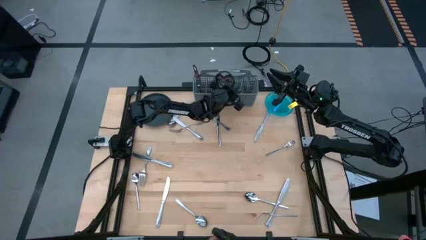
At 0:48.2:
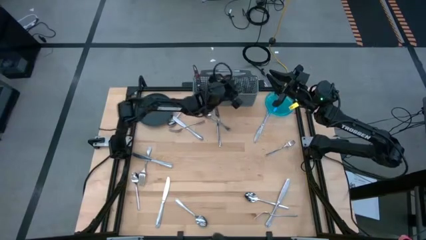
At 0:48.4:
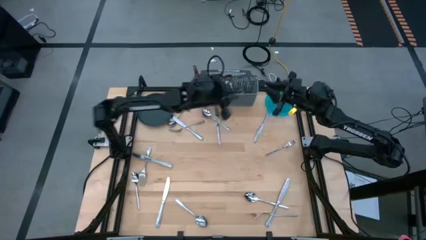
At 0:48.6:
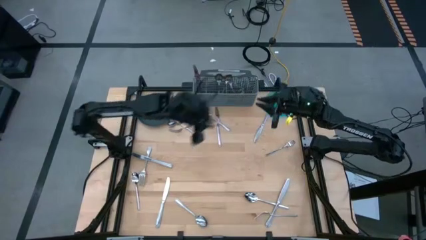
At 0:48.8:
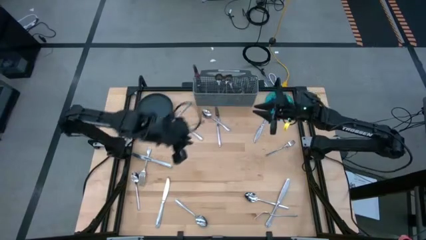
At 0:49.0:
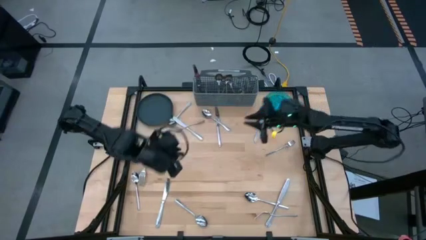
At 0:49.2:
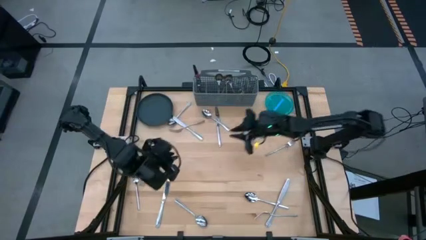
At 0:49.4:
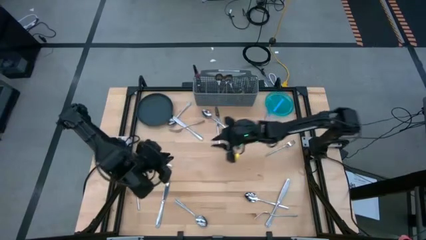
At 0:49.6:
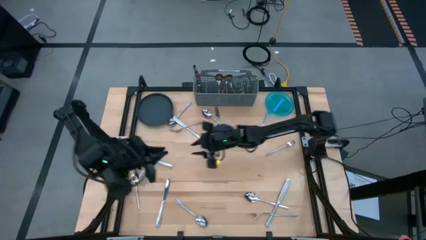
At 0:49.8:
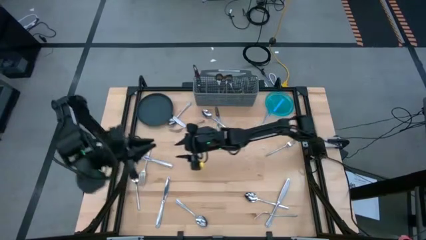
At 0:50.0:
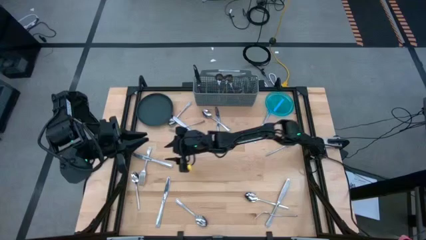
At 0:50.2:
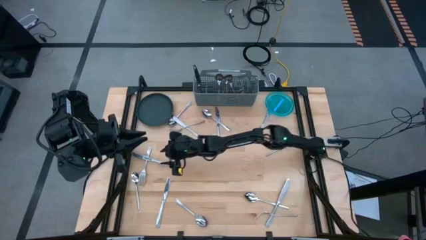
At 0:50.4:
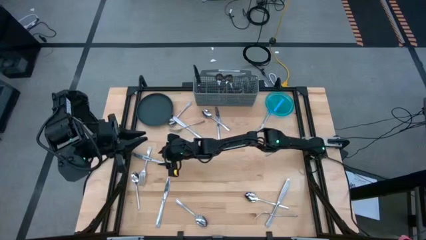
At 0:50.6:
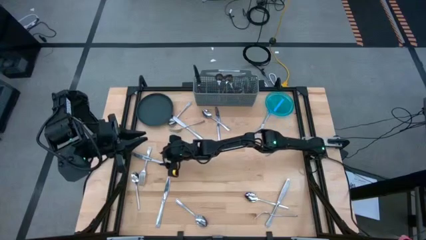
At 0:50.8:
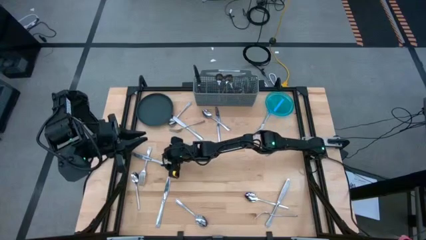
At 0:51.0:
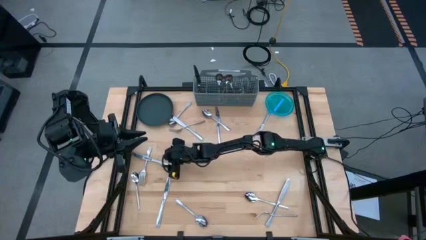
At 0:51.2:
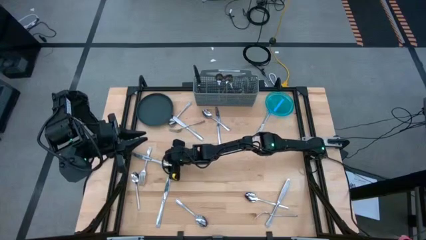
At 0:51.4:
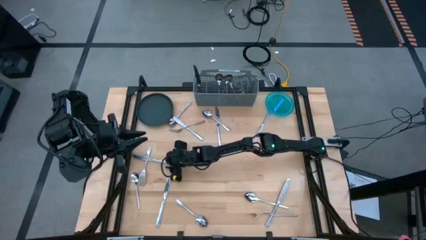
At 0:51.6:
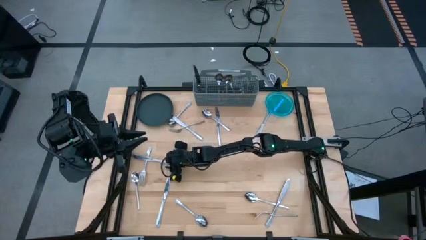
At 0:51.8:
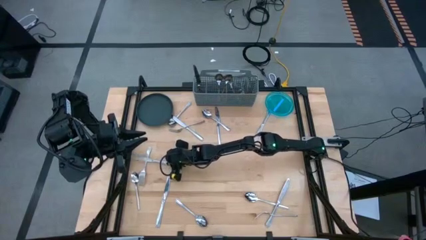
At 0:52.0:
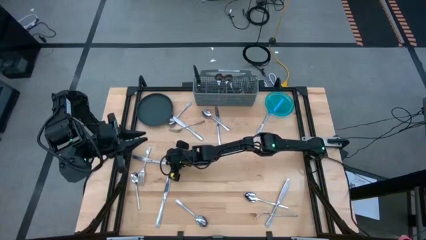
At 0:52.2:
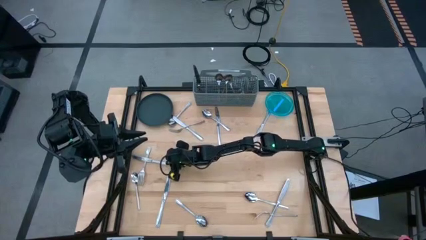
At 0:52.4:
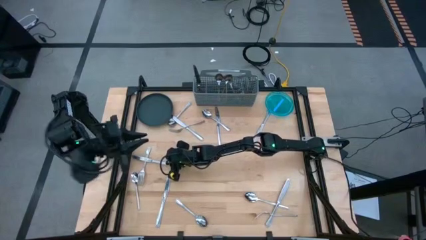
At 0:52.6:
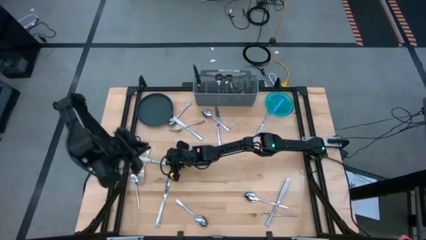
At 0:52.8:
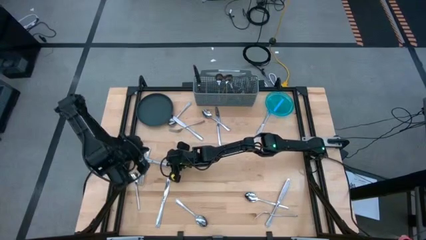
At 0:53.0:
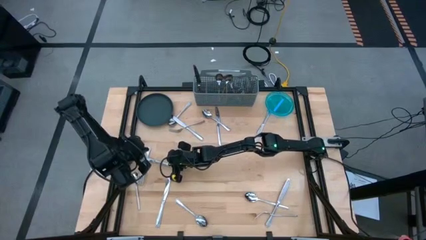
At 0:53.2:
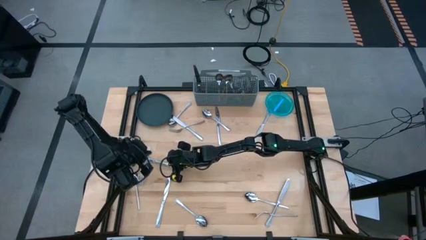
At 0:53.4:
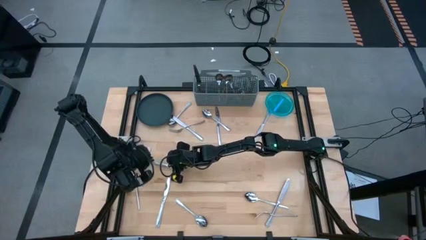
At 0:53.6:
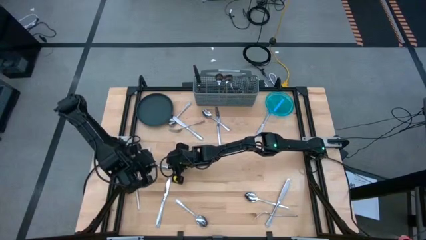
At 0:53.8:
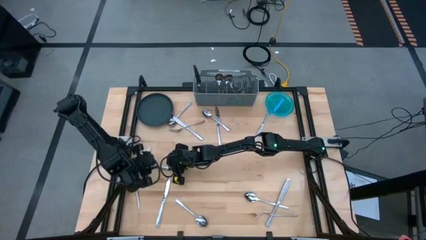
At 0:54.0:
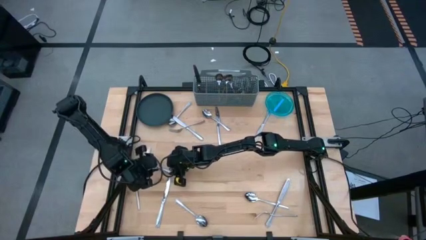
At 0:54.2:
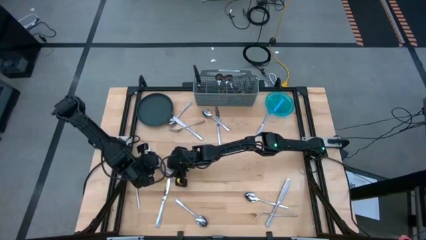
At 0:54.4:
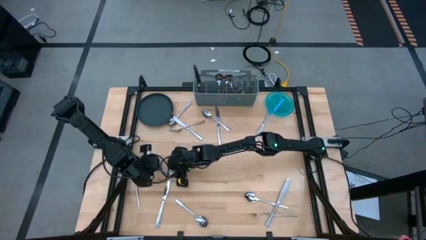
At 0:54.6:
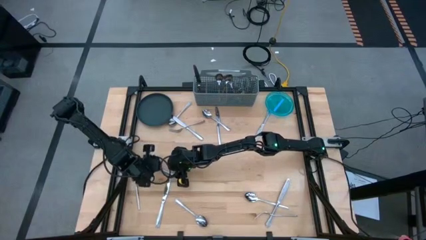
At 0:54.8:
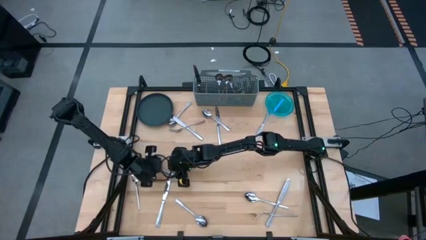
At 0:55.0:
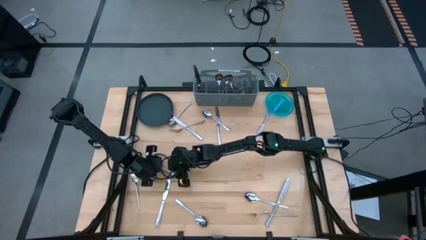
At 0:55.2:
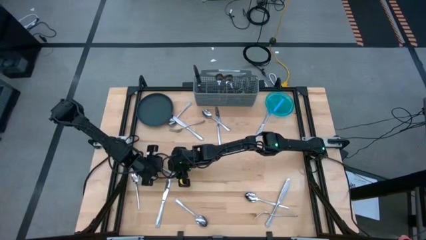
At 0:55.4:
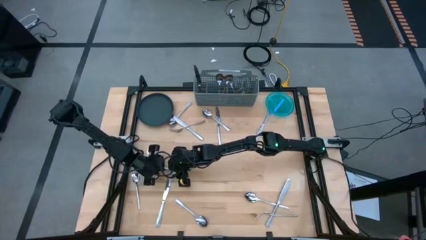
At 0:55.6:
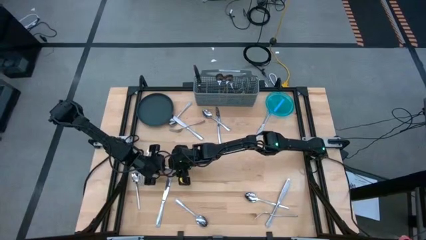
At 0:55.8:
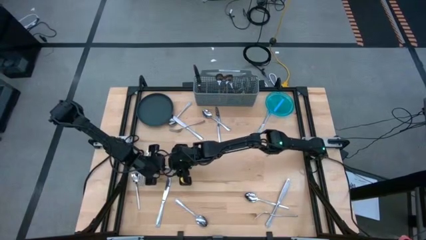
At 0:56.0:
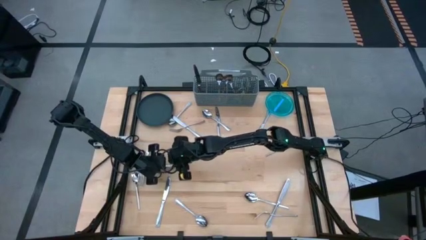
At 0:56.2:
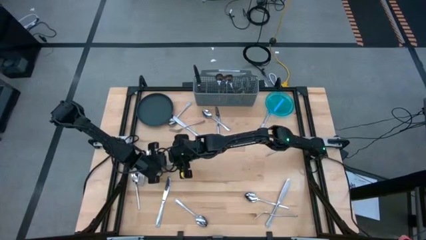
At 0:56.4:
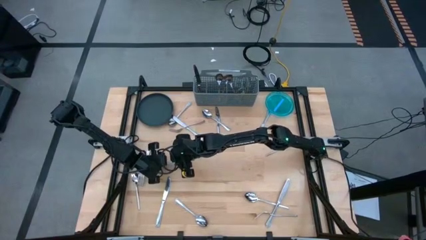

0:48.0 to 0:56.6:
Task: Sort silverware
Put the knife into the silverware basket

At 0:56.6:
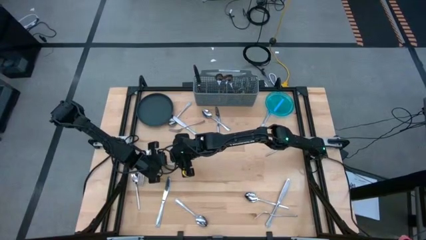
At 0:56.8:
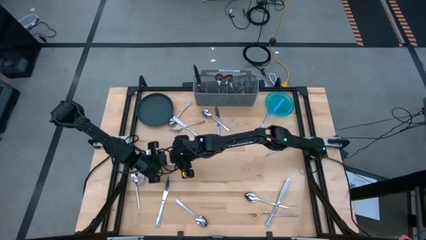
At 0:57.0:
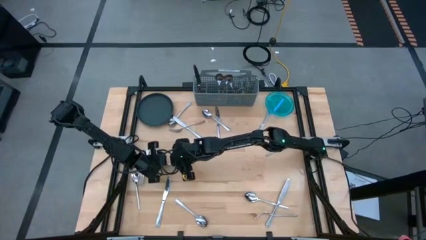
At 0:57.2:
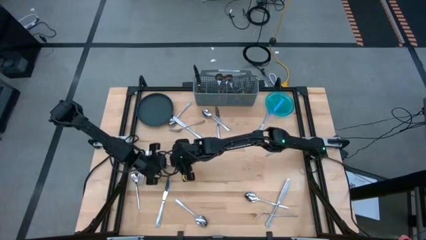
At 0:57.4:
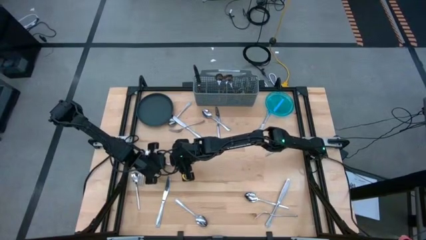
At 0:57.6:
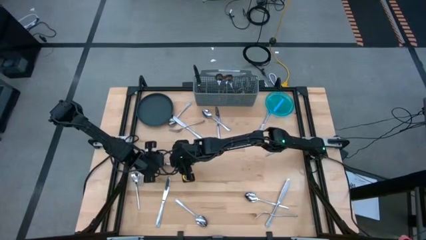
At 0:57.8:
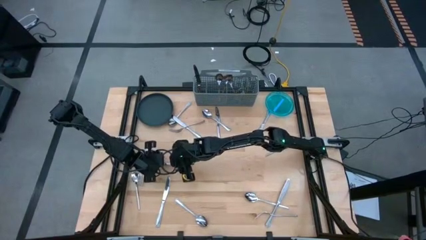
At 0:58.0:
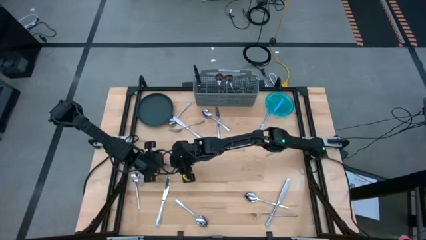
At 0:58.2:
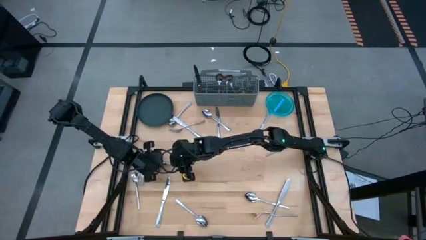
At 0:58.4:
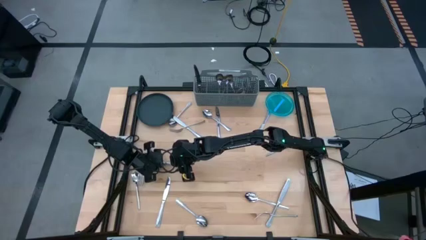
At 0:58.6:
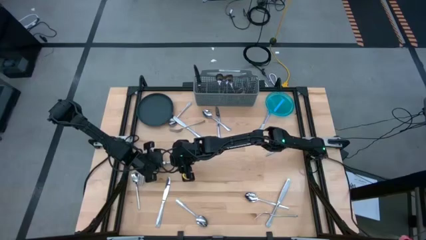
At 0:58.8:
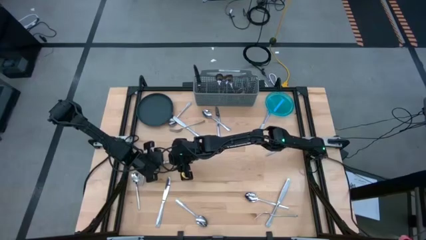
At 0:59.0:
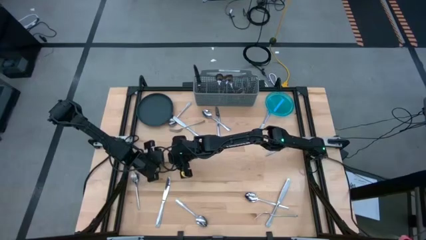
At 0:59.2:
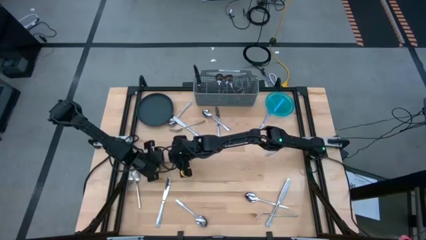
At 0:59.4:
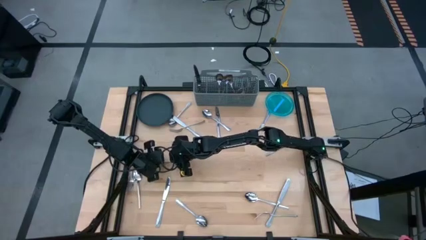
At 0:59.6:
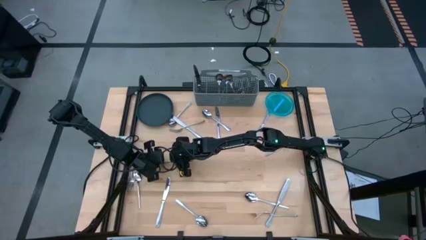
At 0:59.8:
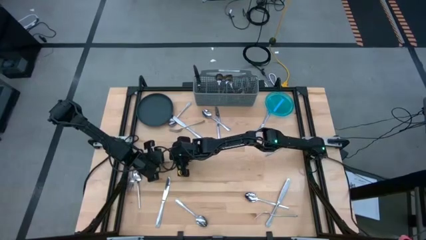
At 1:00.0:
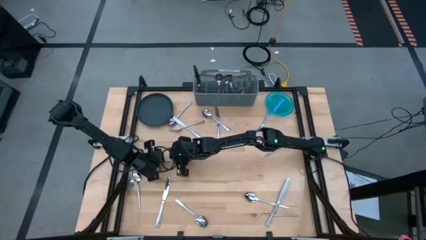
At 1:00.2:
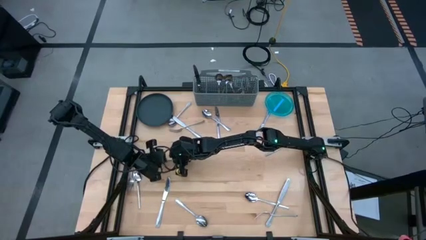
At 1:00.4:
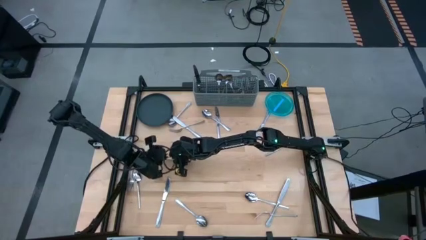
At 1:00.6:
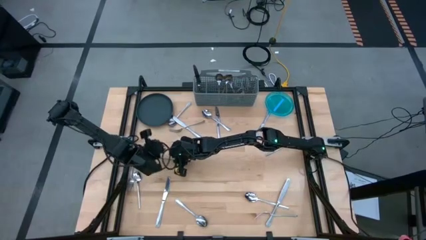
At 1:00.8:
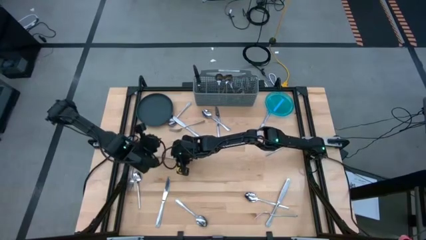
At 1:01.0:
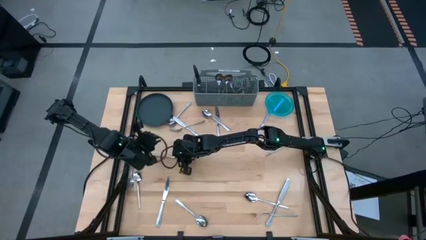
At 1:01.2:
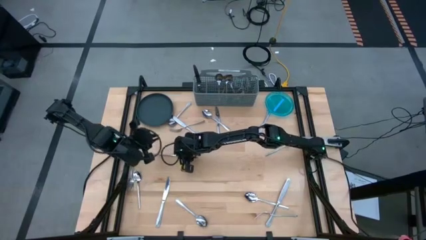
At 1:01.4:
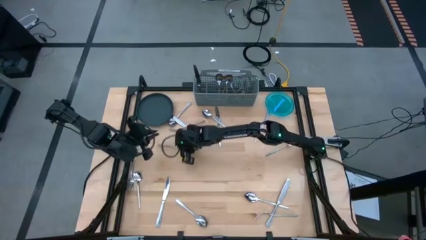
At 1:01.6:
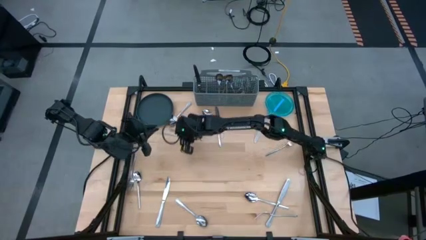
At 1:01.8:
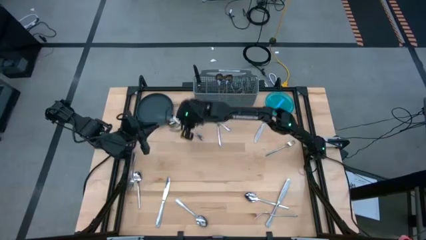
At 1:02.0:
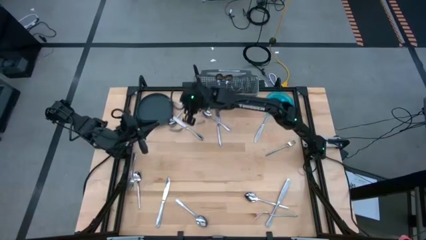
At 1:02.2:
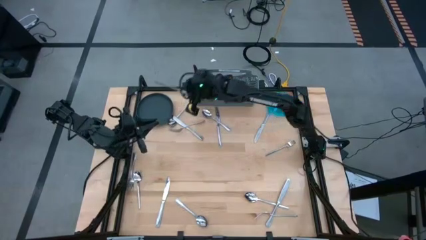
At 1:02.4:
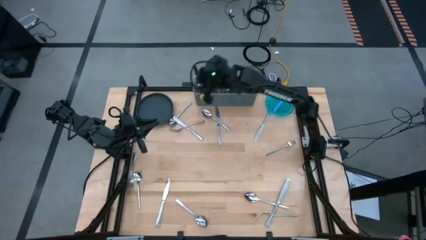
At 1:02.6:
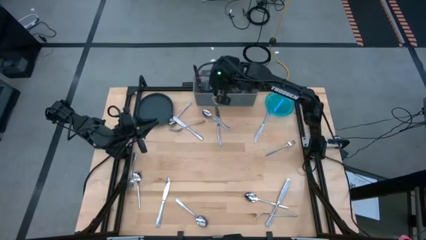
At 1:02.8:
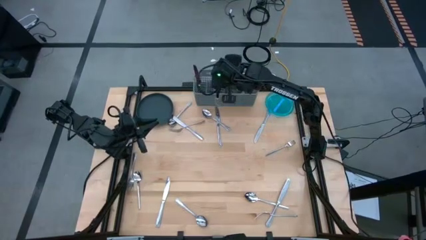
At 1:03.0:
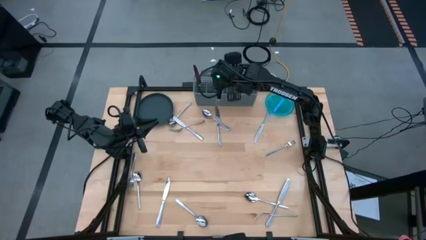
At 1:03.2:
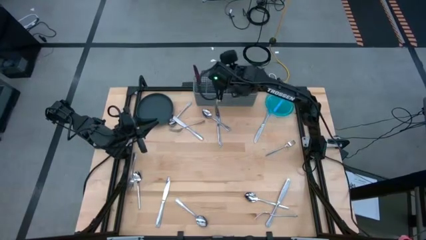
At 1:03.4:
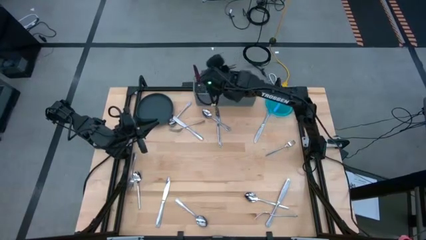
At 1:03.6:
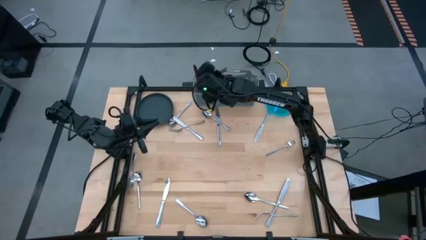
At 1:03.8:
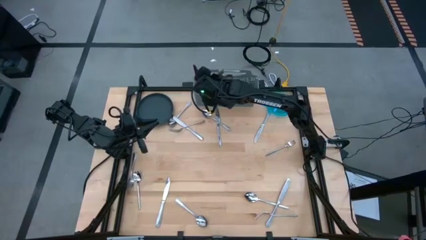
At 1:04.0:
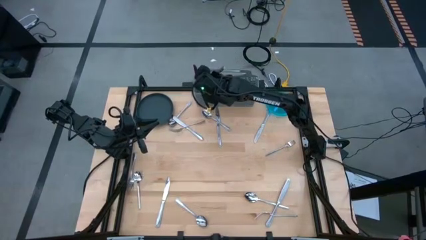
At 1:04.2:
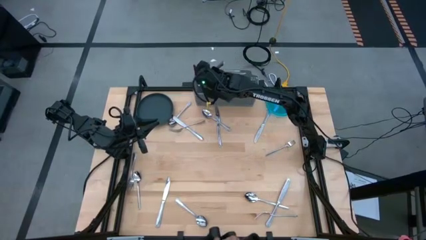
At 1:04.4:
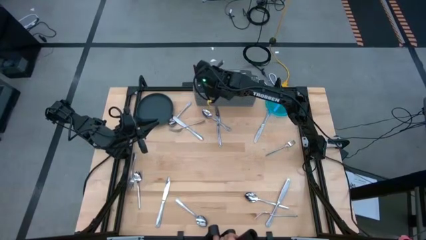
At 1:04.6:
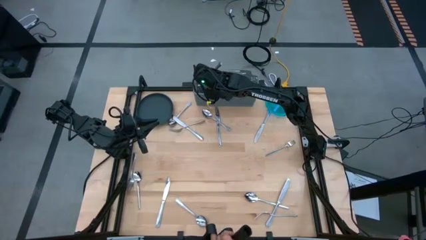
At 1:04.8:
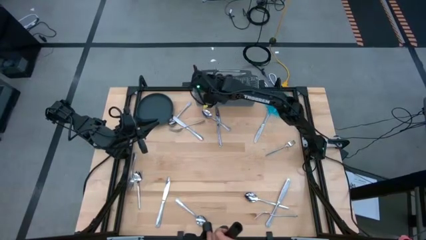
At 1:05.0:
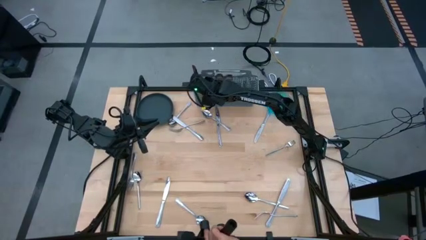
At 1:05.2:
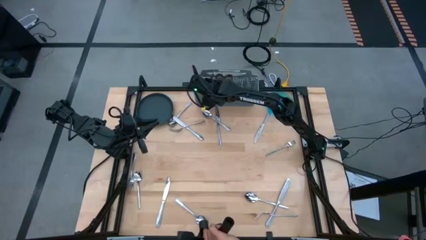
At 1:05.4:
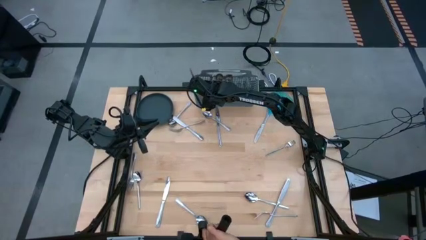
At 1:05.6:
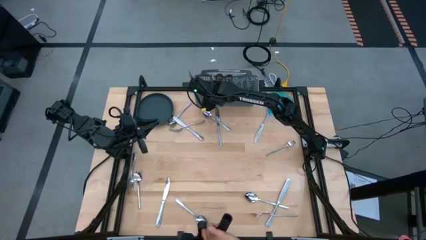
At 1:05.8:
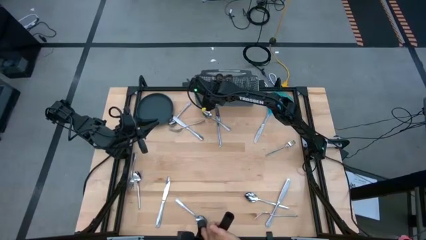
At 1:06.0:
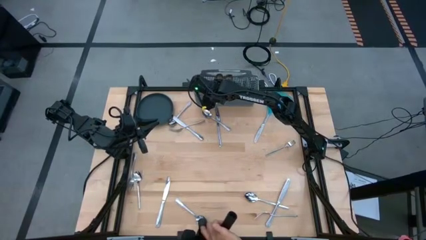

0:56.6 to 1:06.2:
Put the knife into the silverware basket
